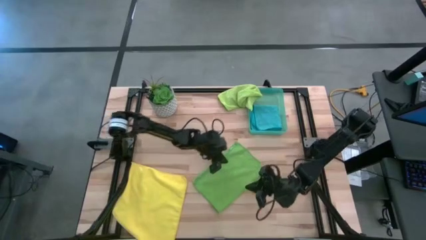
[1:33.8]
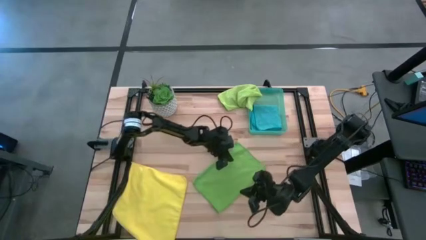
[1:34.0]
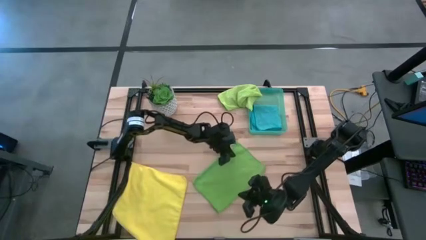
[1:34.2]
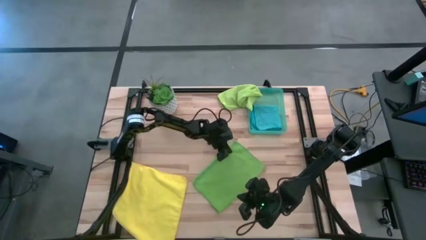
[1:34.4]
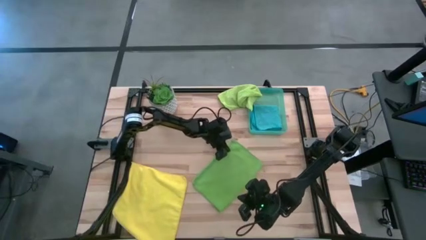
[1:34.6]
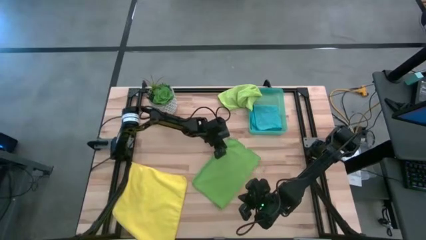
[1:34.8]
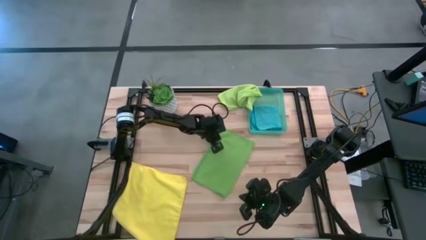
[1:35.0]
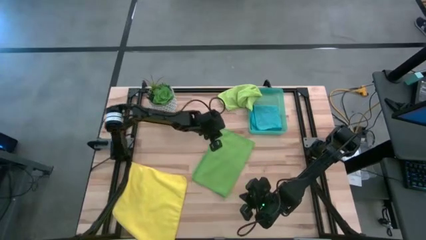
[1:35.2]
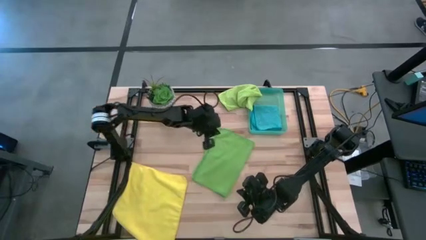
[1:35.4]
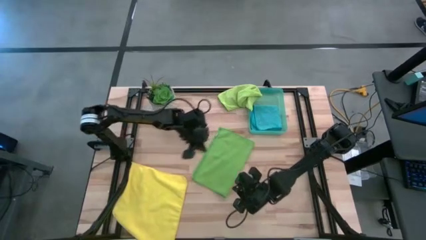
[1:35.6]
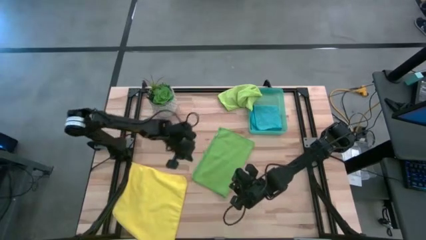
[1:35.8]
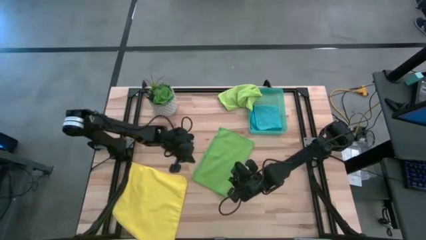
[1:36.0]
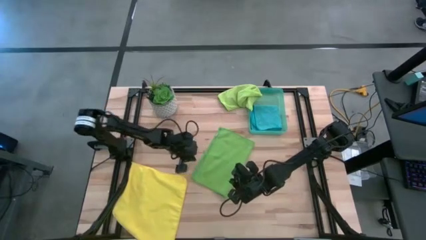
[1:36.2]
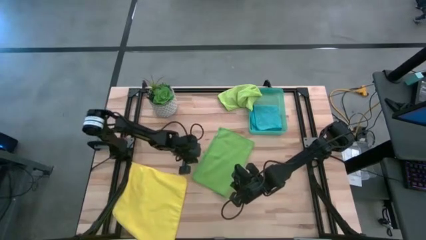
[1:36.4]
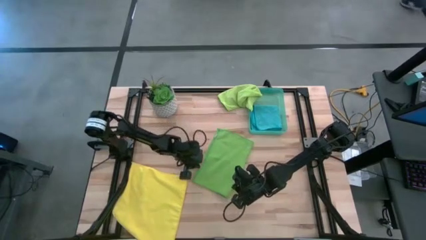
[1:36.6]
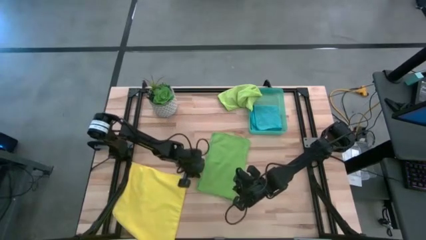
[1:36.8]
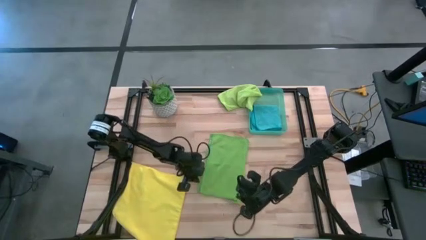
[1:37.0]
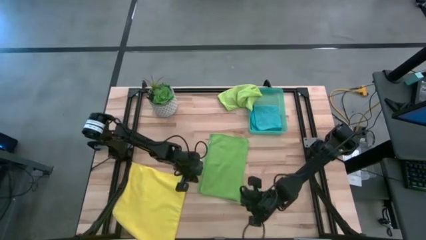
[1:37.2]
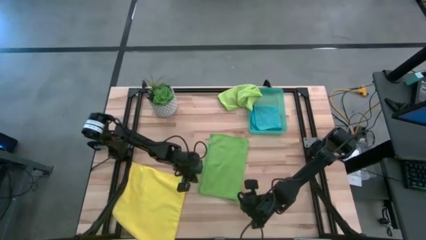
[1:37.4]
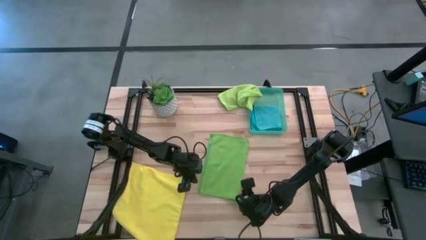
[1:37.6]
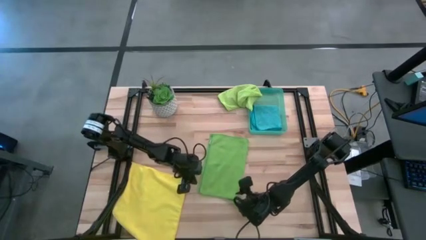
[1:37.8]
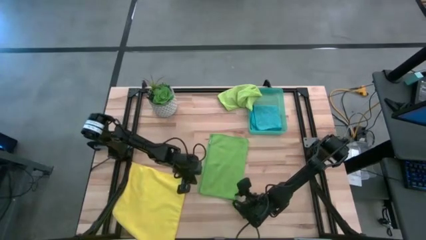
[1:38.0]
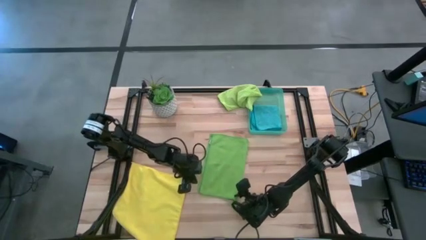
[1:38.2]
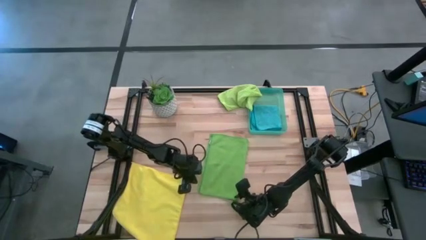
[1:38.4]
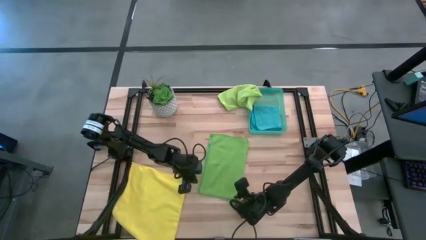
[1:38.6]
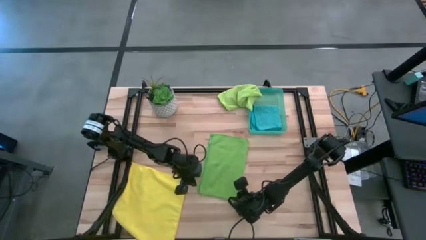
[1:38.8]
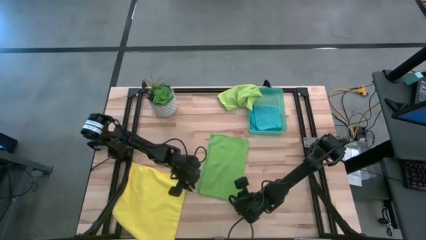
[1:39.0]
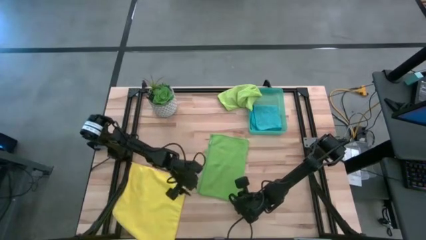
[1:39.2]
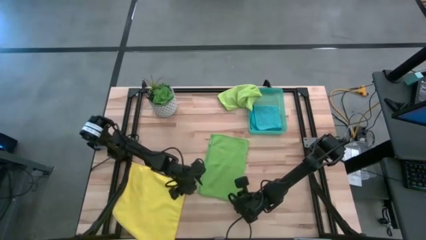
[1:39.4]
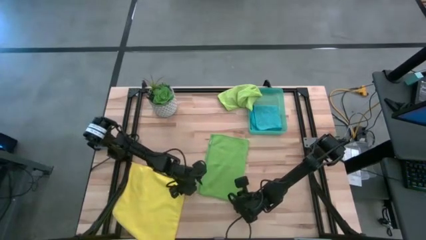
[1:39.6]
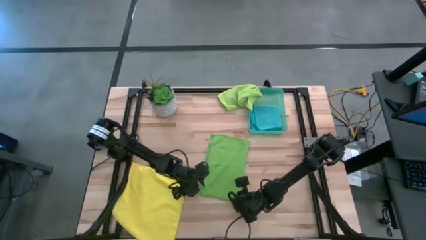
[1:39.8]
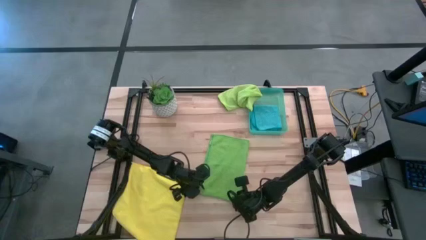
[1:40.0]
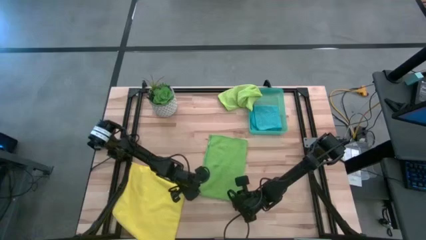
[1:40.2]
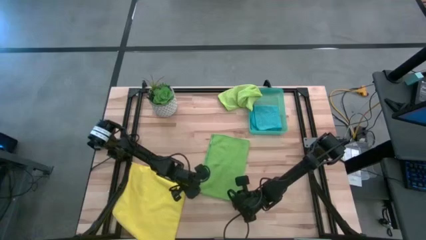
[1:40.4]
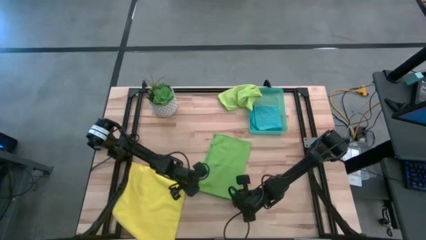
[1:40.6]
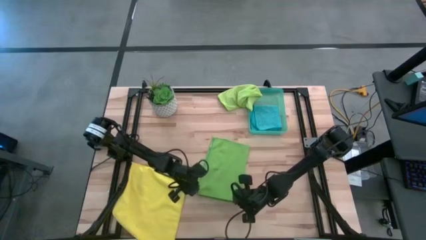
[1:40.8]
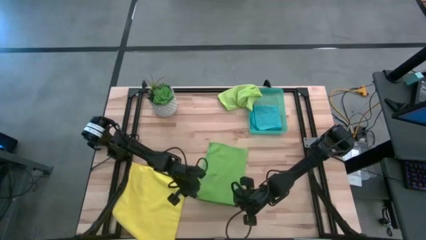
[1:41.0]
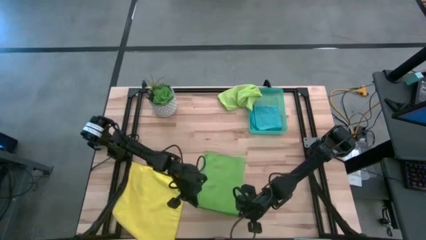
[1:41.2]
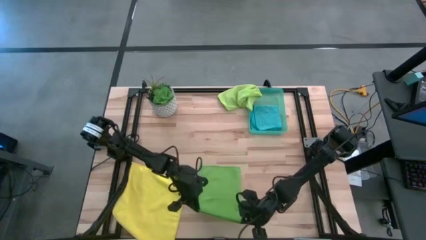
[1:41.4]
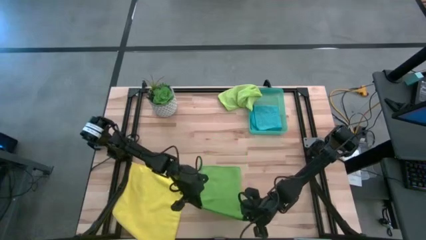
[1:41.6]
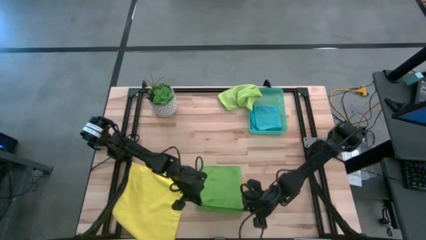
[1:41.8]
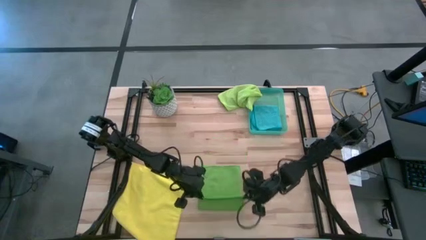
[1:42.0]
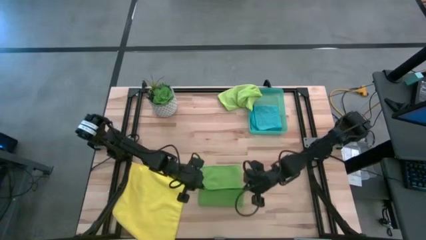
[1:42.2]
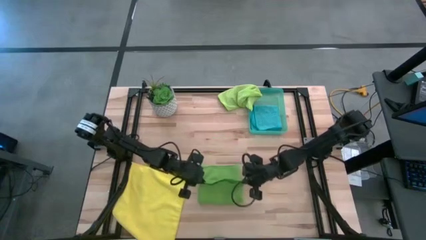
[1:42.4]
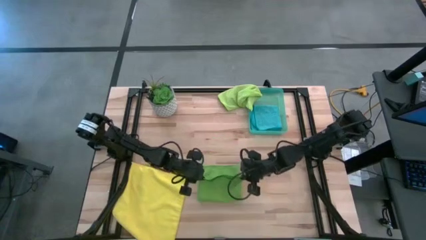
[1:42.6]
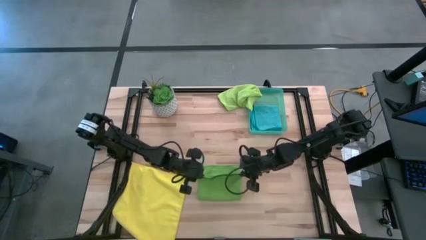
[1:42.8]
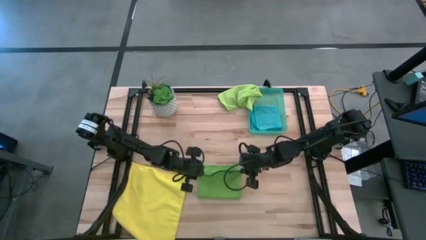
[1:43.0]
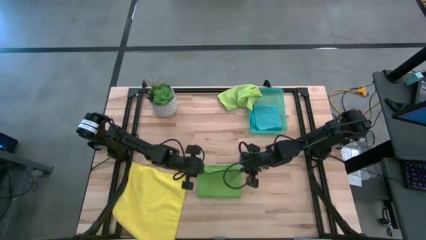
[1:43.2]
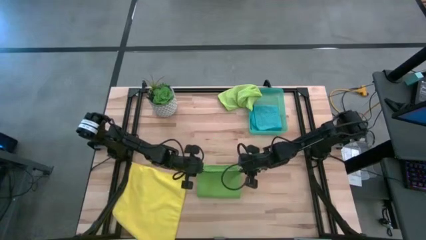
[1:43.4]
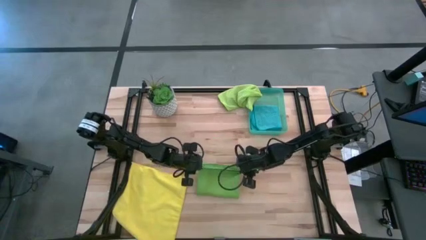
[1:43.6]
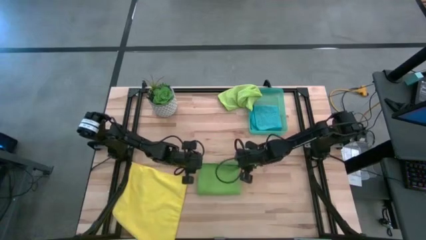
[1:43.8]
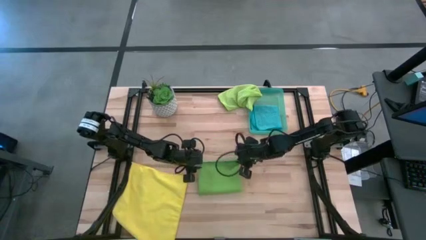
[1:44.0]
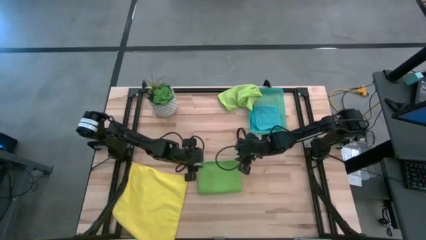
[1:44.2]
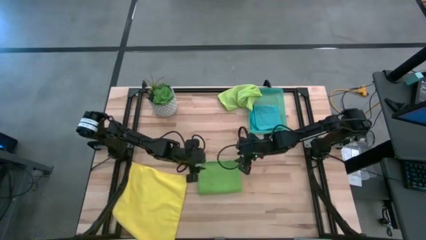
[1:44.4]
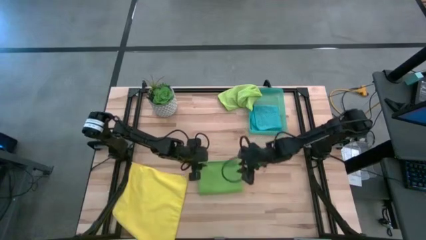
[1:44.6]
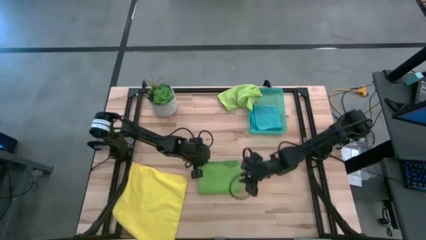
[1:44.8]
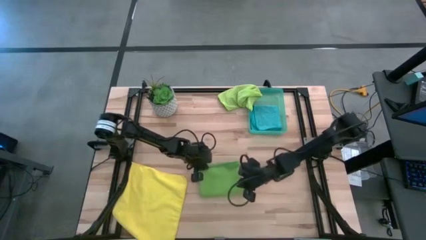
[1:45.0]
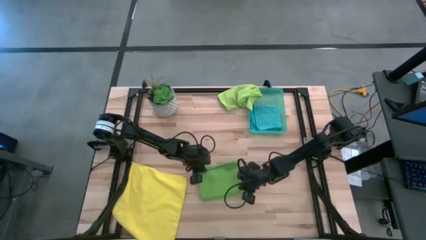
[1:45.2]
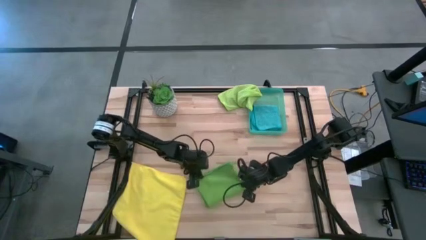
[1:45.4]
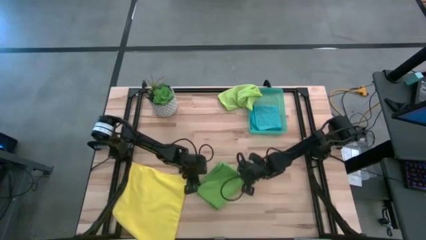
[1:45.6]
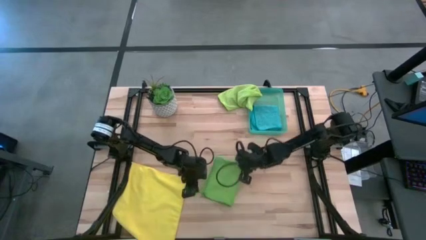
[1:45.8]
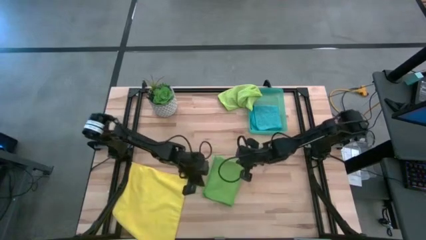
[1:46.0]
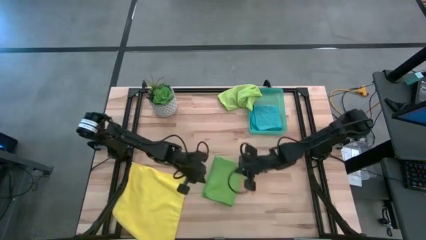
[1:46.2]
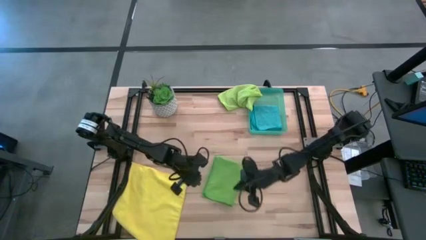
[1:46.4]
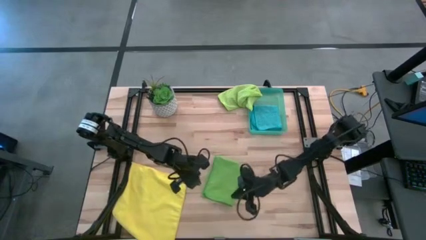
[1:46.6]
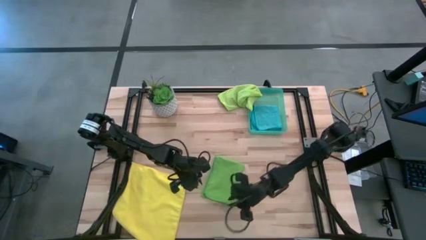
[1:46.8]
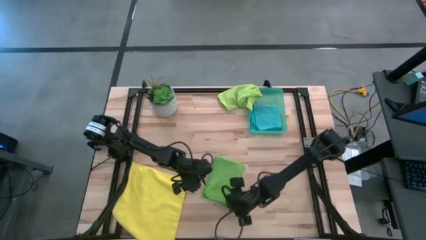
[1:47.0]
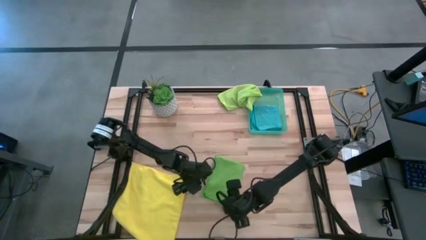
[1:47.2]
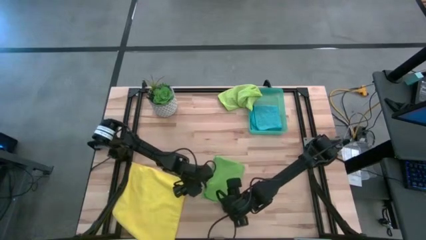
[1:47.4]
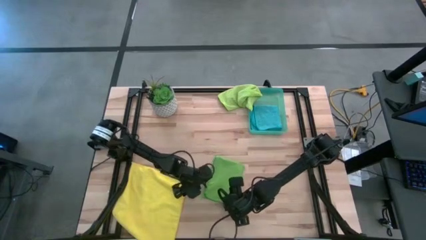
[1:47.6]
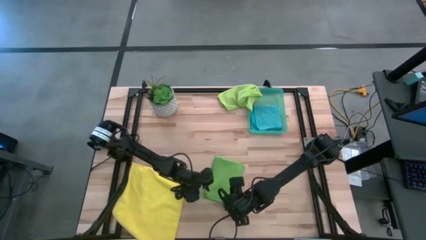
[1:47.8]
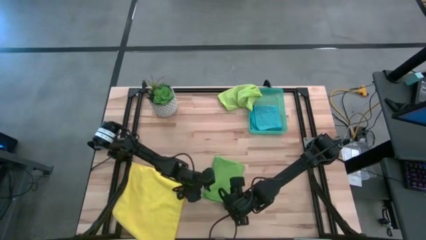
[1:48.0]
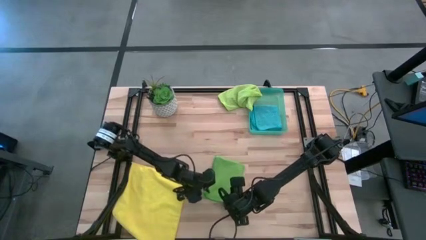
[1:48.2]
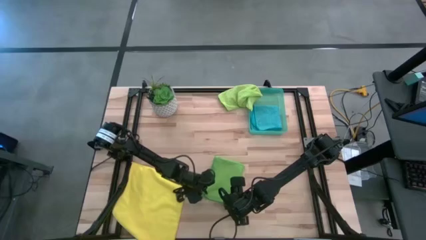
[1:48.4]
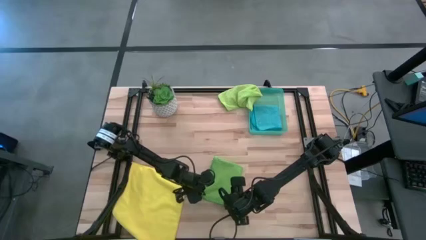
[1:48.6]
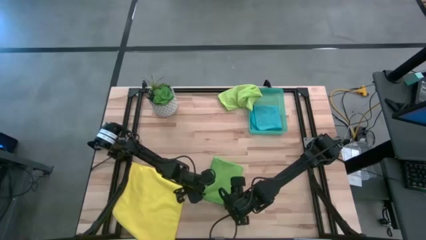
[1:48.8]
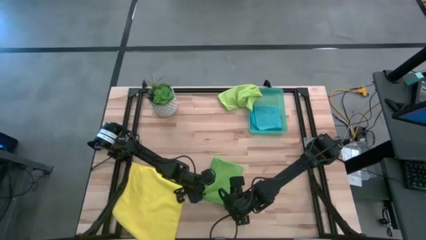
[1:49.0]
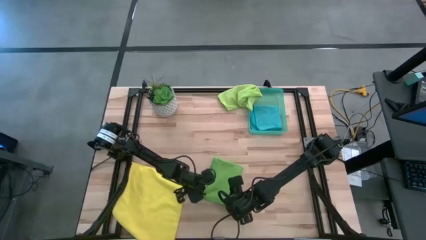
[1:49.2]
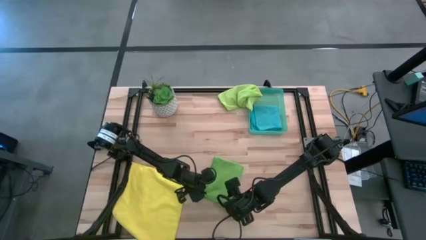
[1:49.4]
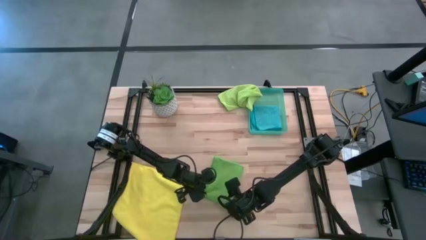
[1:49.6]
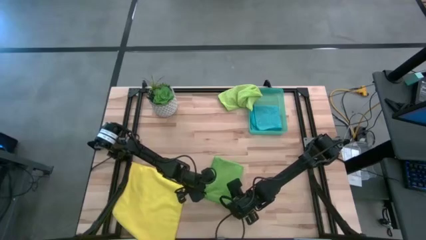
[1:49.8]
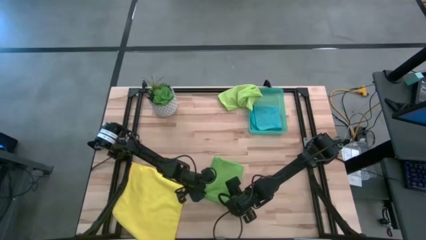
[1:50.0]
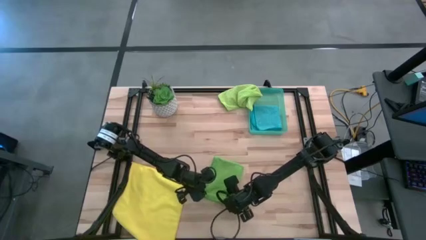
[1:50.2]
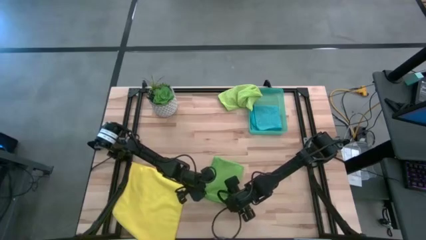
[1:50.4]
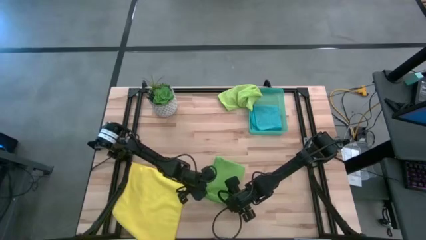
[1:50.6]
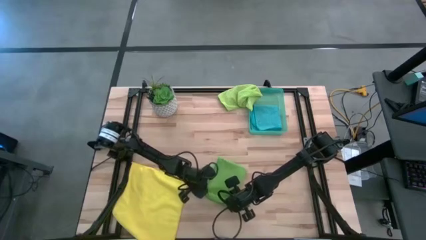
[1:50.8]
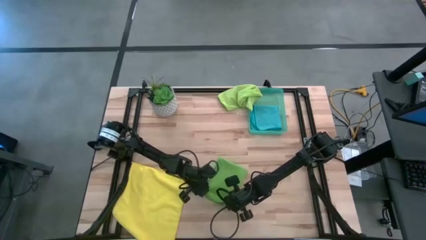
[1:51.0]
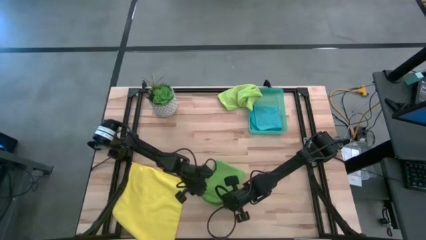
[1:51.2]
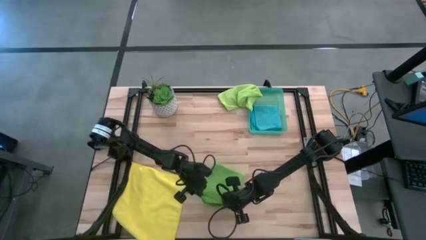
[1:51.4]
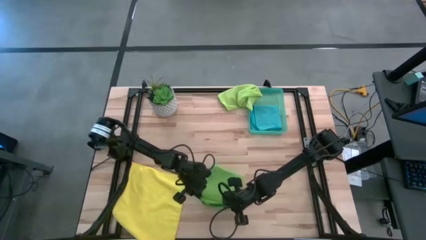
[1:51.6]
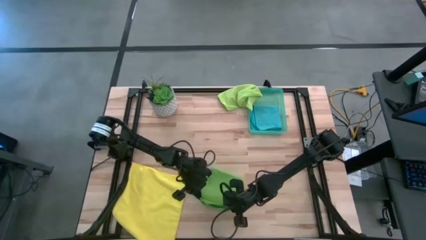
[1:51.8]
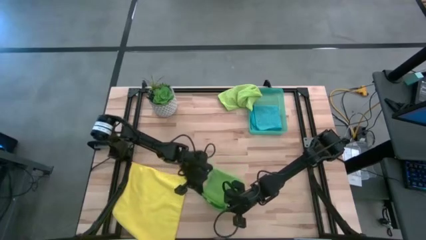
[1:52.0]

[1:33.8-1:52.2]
Task: Fold microfiber towels
Fold the green towel
